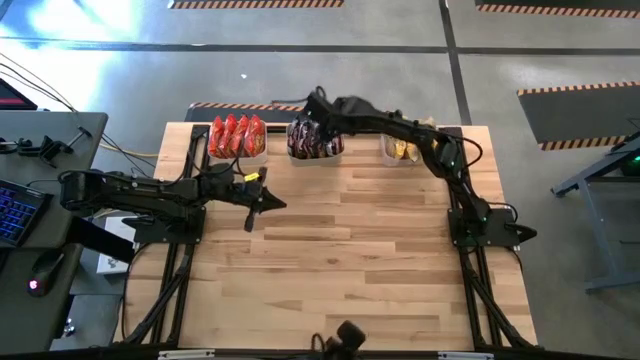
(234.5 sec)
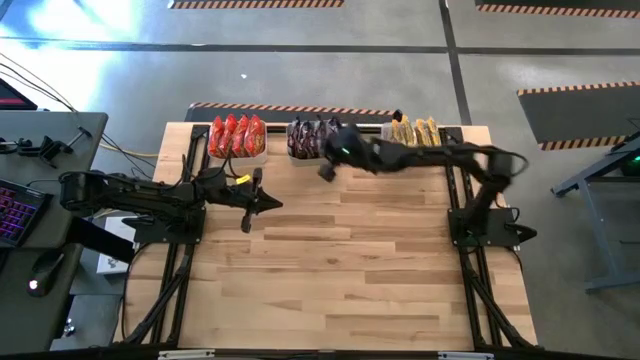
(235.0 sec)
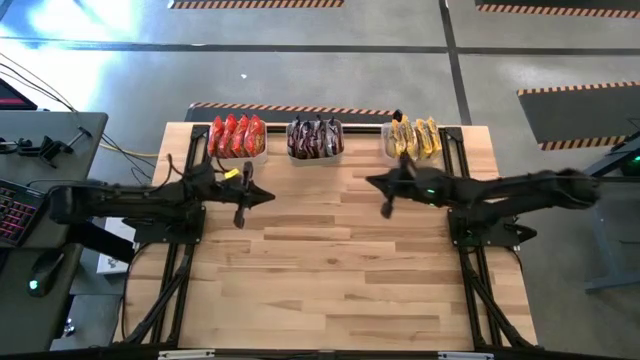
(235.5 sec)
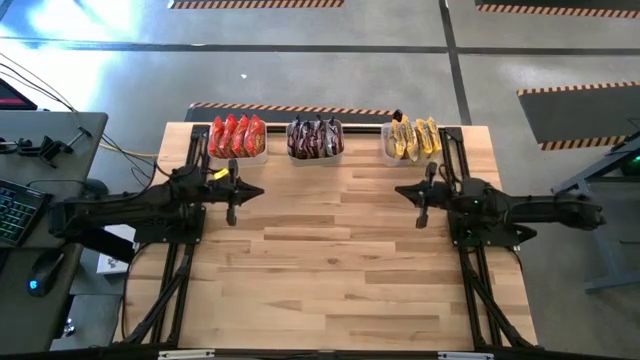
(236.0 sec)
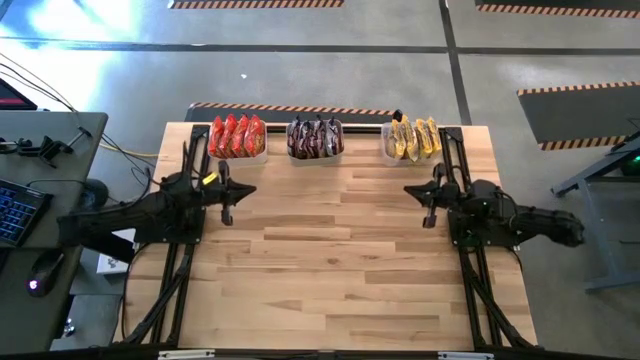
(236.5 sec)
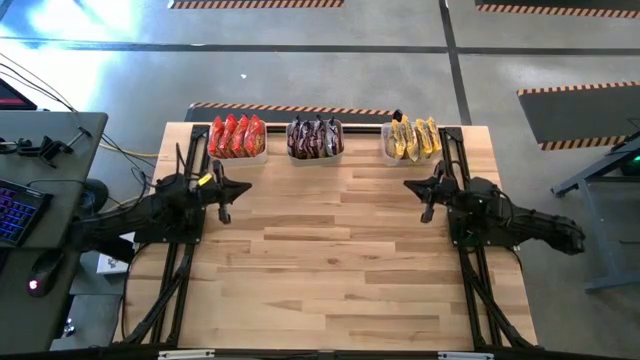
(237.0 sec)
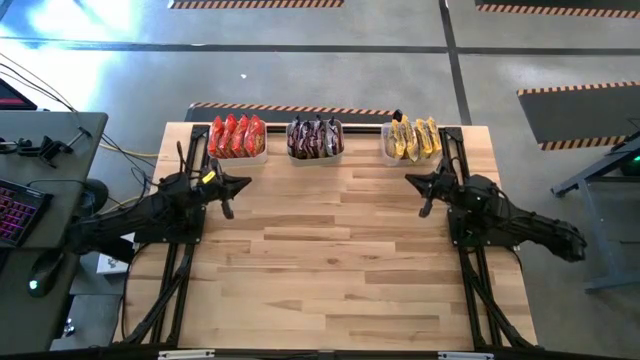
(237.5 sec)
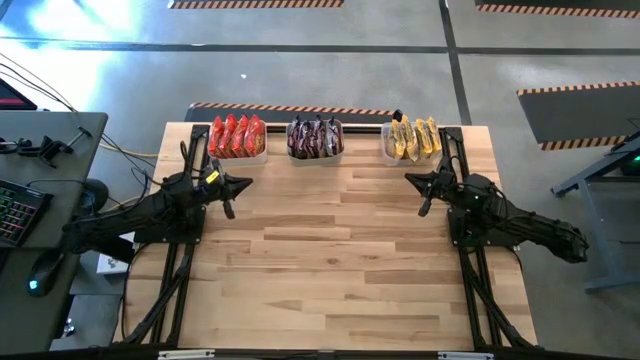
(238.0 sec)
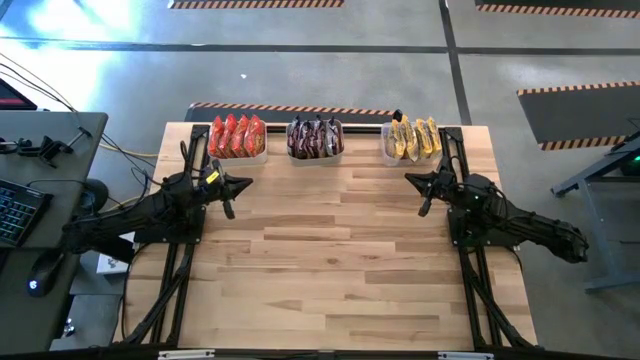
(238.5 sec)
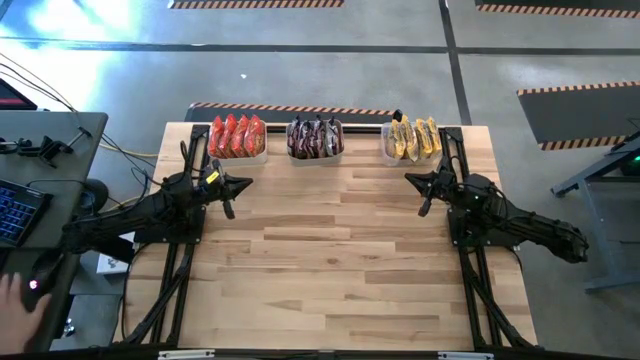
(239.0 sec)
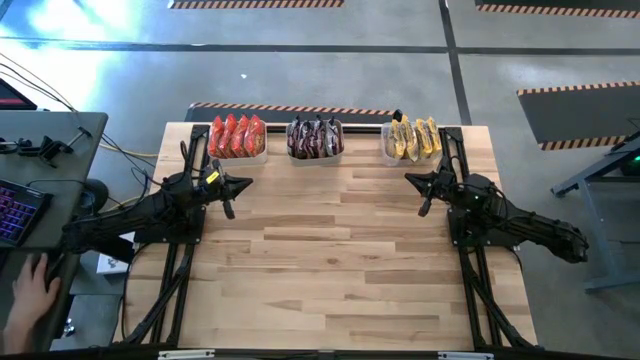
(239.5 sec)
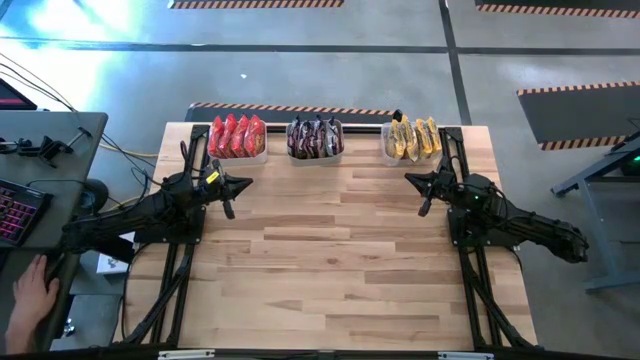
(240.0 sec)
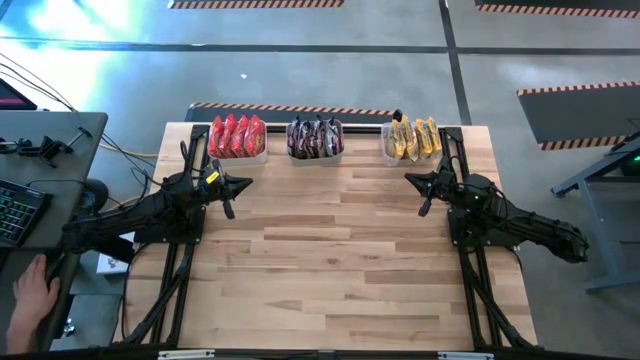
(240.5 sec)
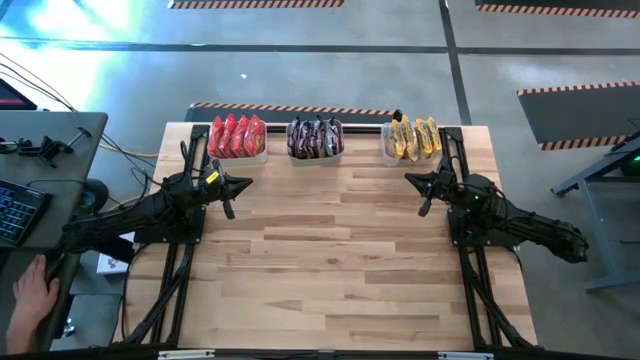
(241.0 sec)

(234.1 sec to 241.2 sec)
Task: Sort Maruchan noodles
Return to Home Position

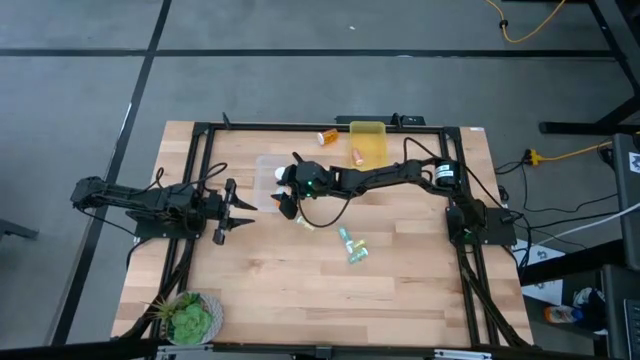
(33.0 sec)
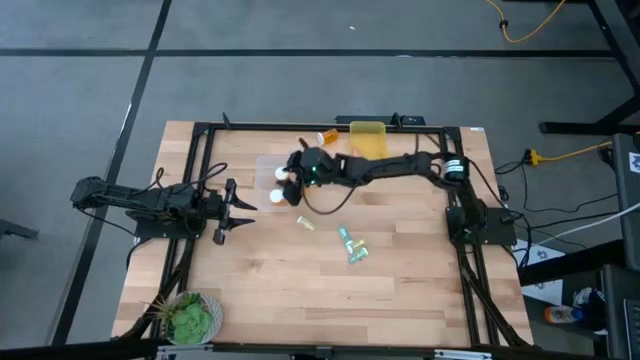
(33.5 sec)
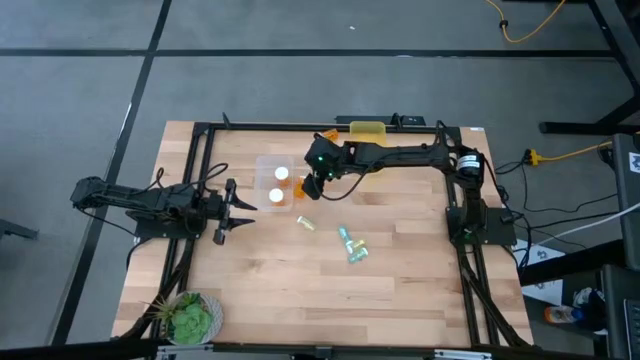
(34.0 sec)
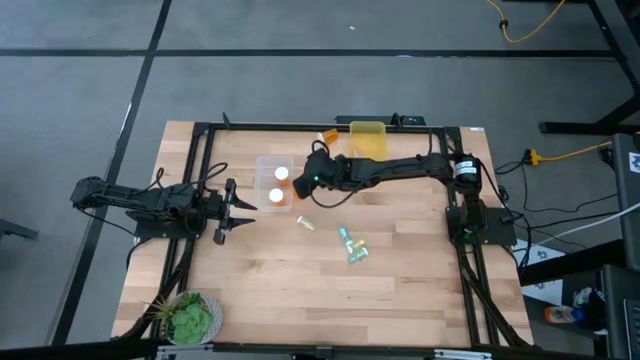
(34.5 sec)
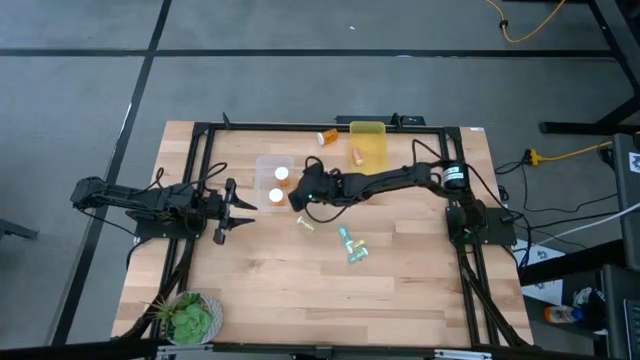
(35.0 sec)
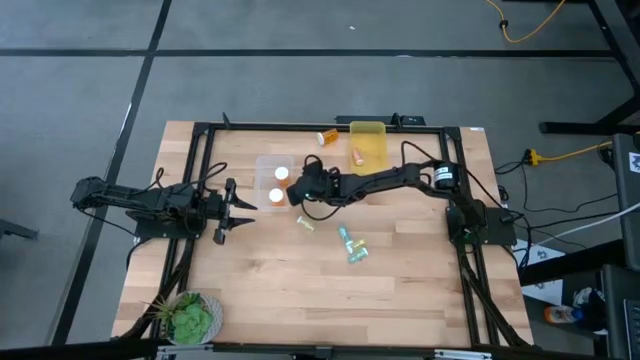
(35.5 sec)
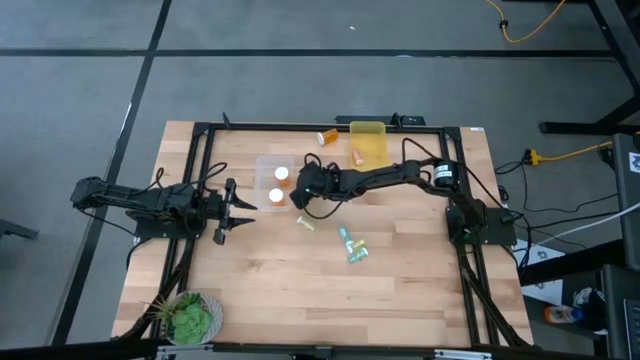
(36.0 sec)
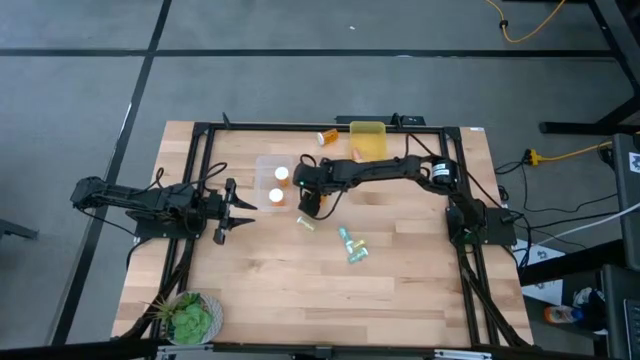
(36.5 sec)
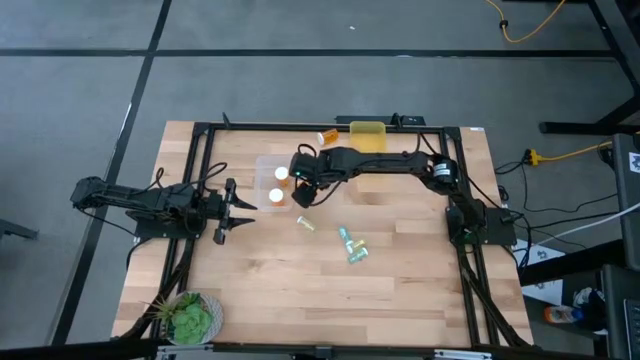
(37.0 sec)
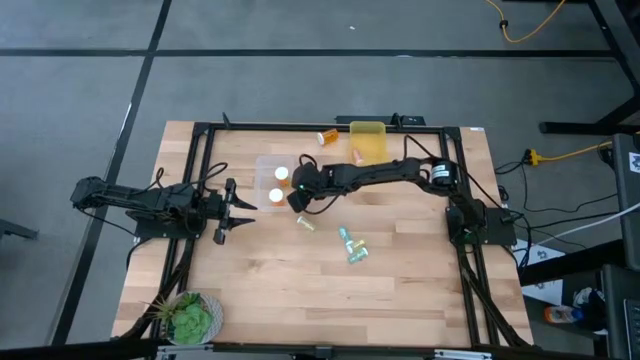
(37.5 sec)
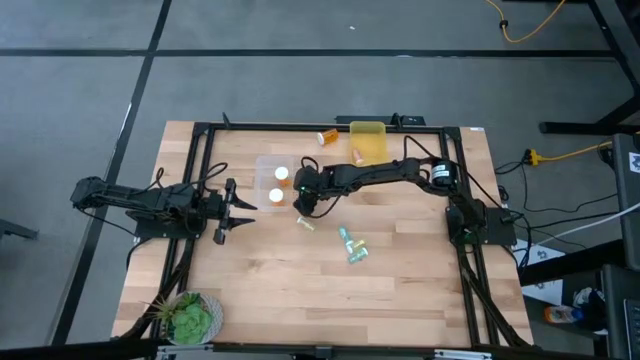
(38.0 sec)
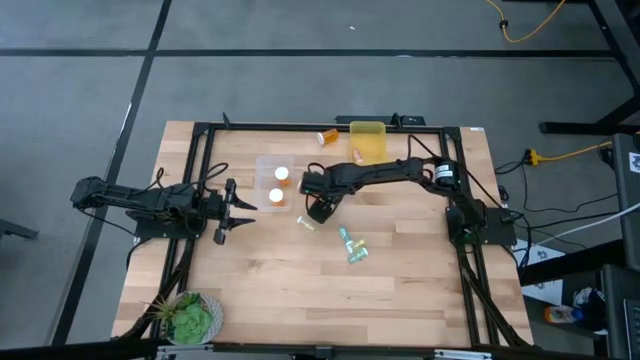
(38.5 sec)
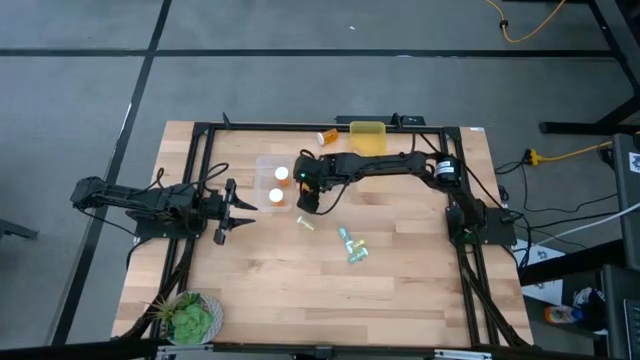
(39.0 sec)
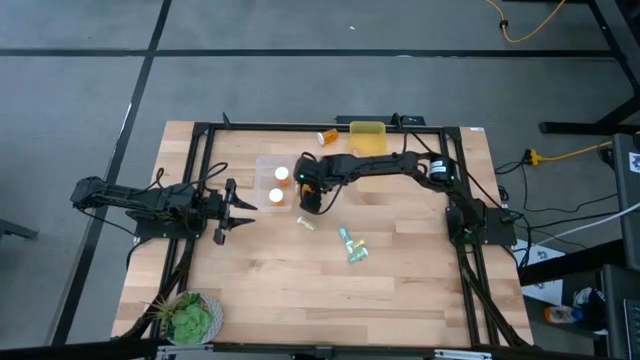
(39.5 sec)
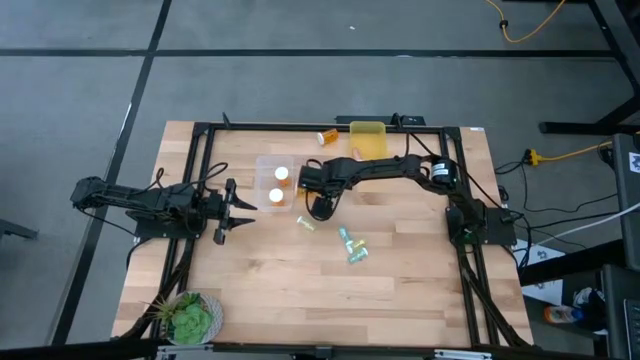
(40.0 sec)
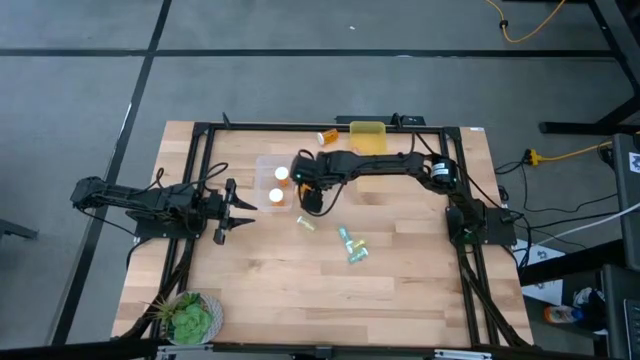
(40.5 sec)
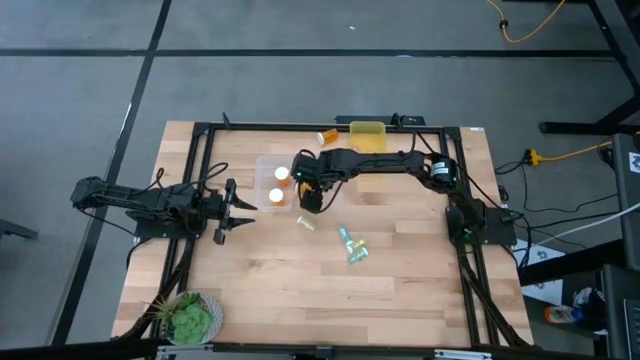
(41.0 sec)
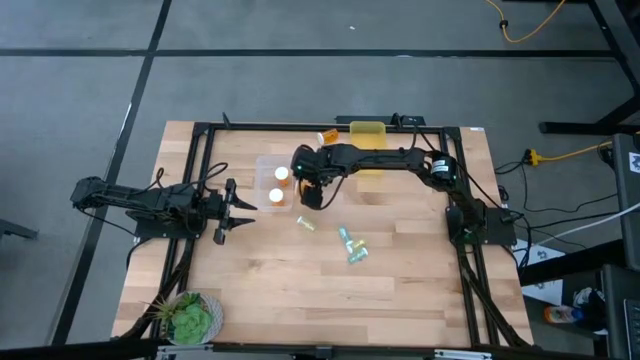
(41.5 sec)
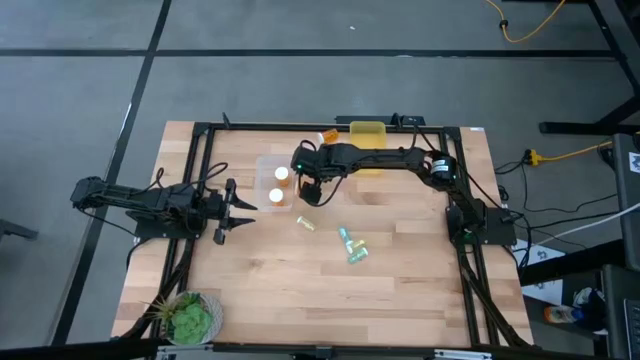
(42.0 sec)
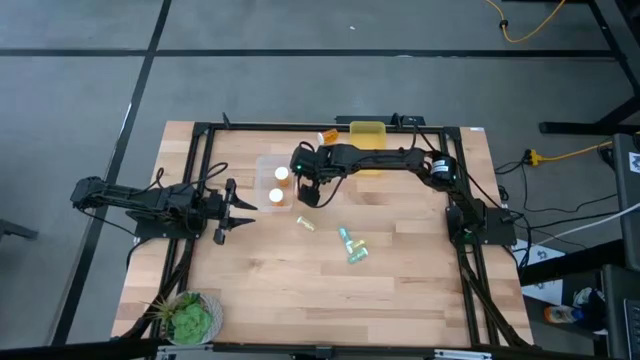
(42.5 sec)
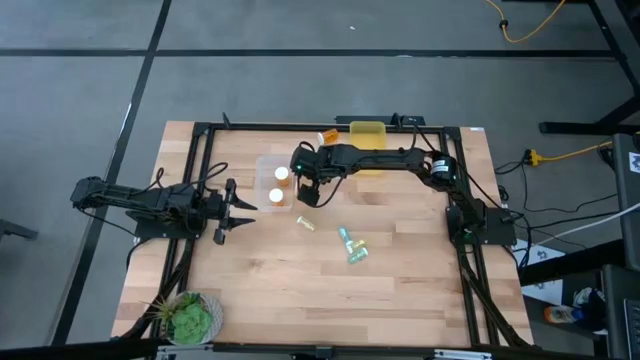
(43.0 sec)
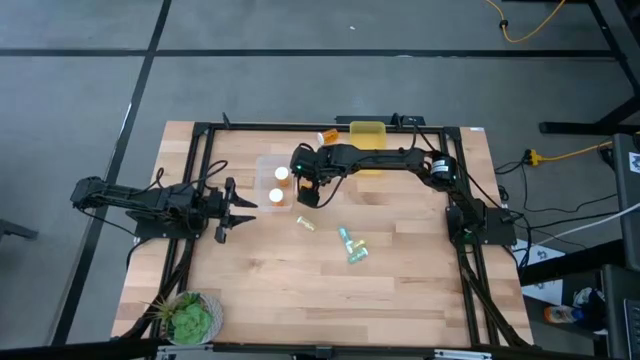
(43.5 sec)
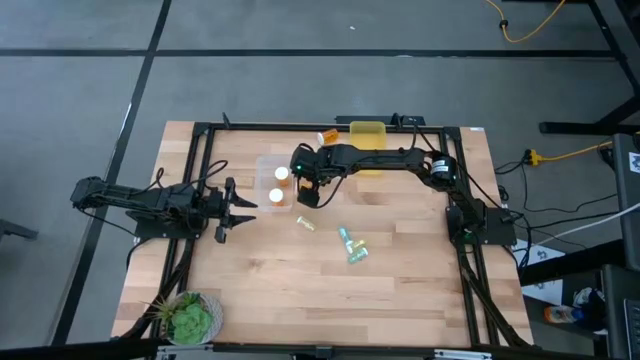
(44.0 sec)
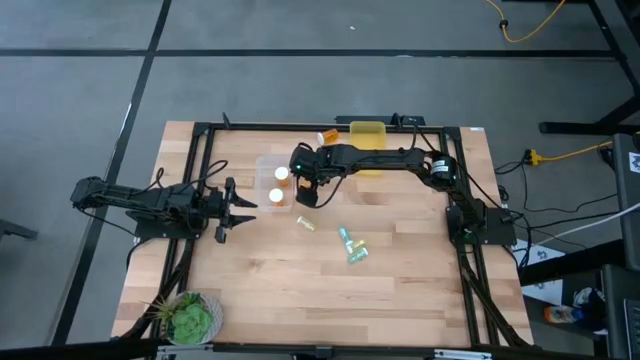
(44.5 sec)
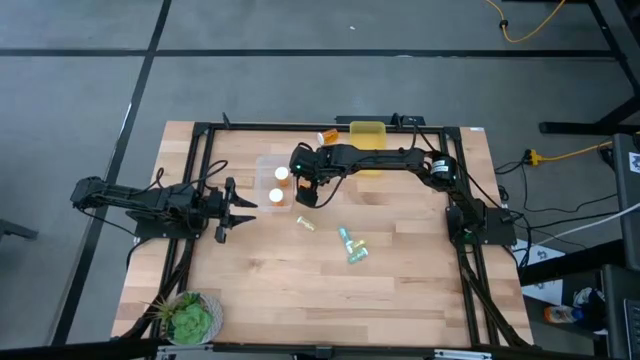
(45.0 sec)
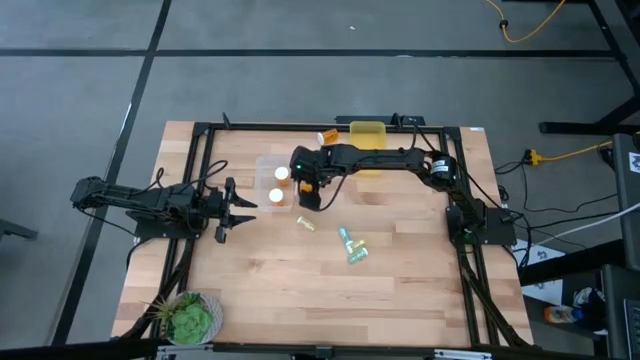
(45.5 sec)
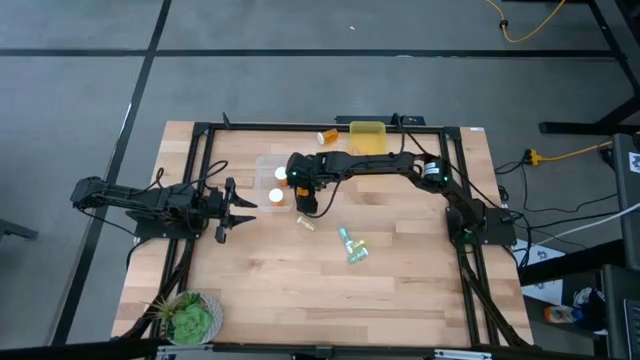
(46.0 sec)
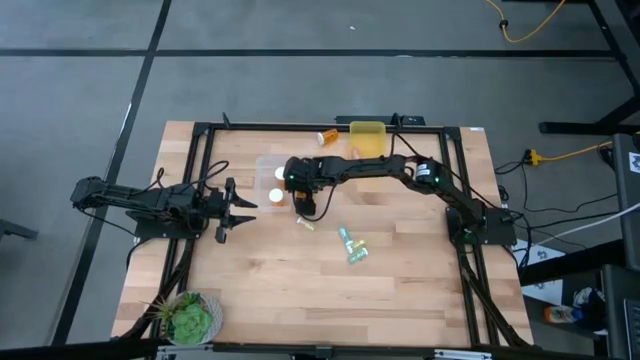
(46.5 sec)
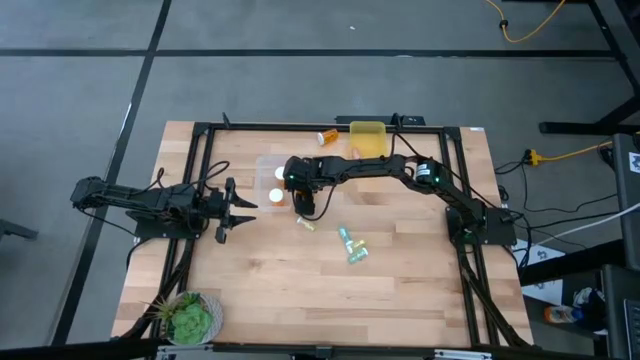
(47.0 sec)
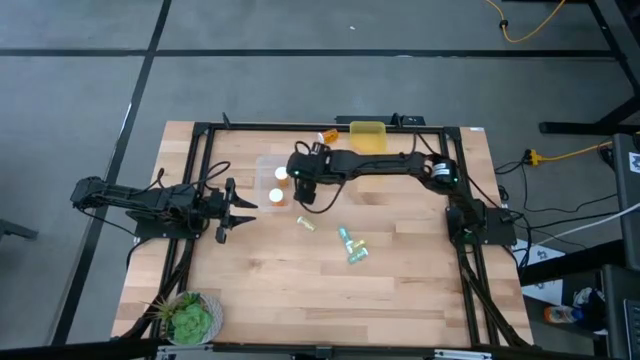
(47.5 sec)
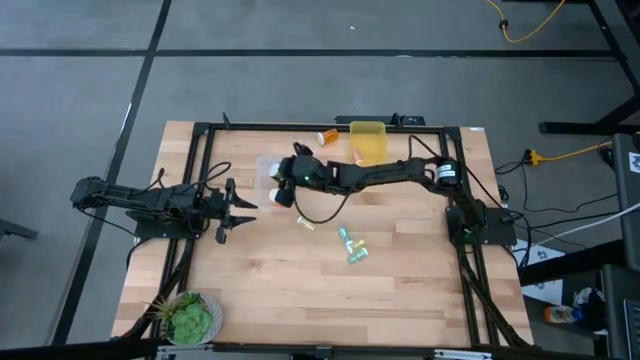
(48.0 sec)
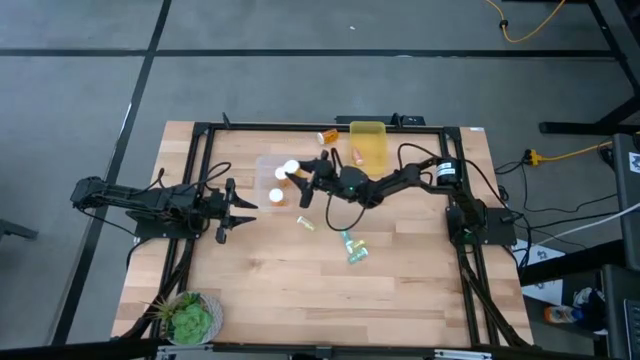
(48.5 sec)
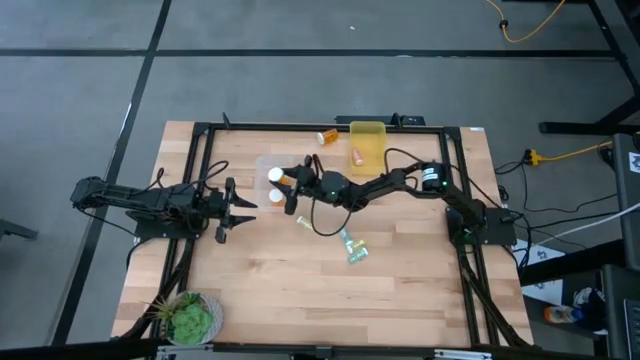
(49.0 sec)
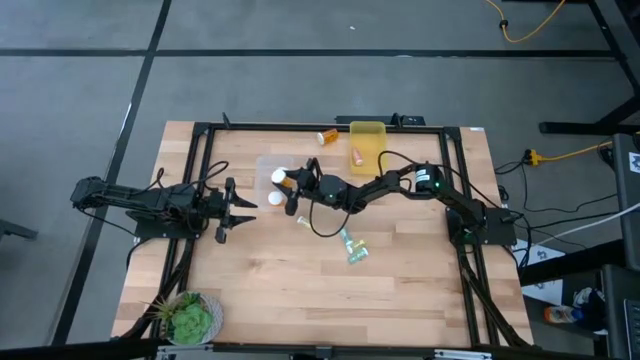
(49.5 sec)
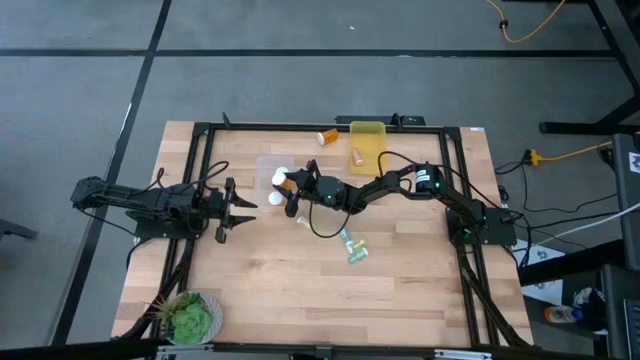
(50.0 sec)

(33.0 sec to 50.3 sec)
Task: Pick and place medicine bottles into bin by pill shape (circle, oval)
Put the large orange pill bottle into the transparent bin
